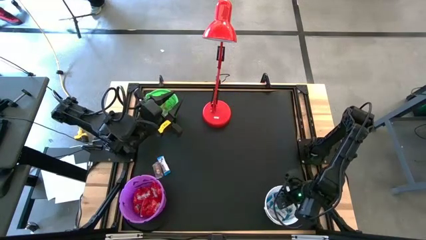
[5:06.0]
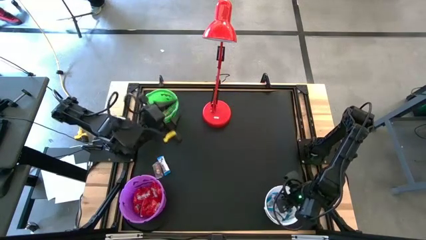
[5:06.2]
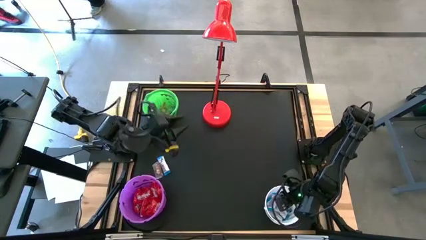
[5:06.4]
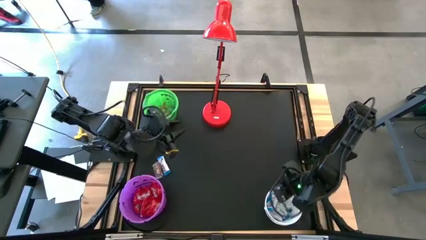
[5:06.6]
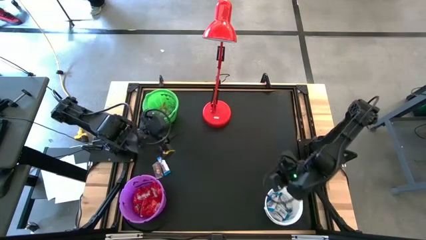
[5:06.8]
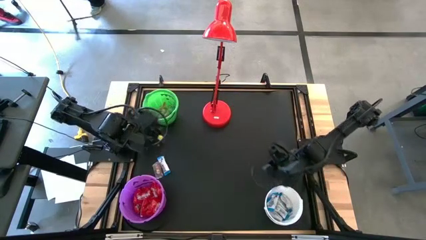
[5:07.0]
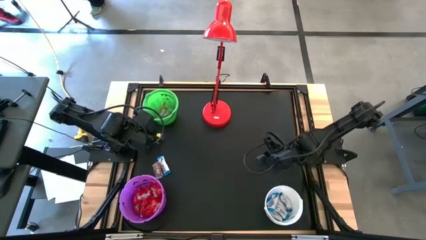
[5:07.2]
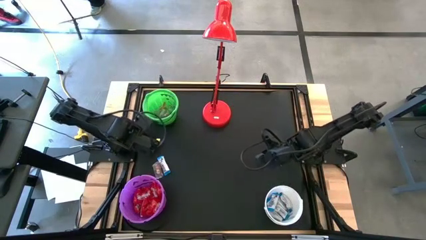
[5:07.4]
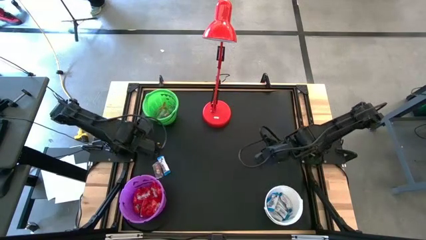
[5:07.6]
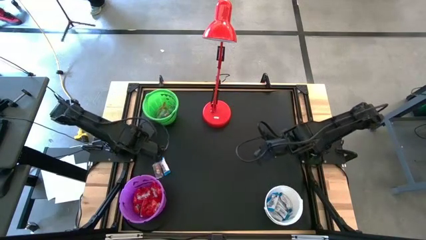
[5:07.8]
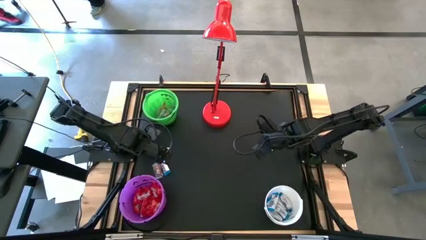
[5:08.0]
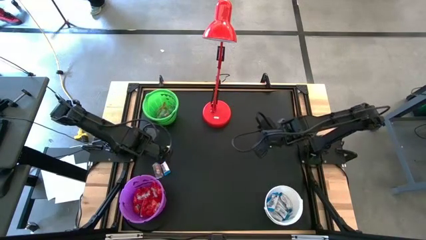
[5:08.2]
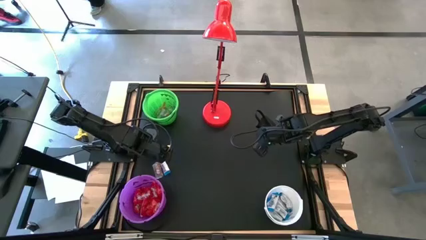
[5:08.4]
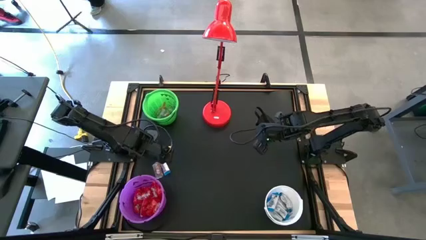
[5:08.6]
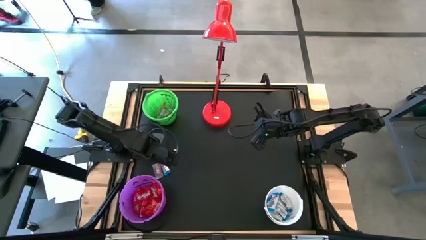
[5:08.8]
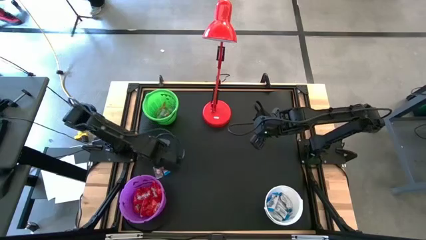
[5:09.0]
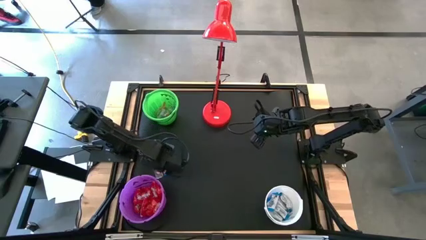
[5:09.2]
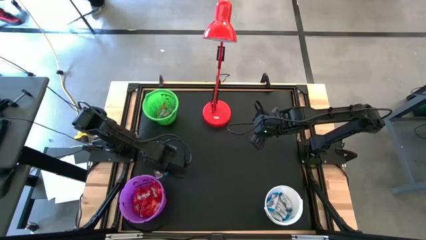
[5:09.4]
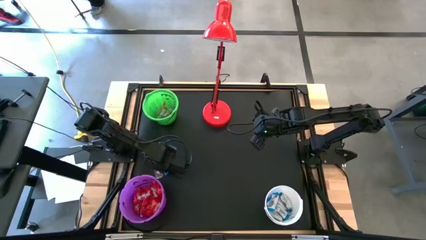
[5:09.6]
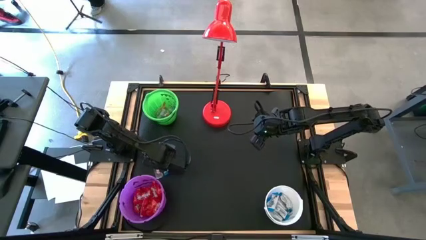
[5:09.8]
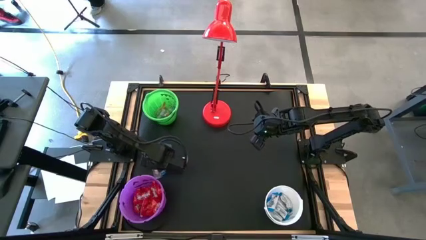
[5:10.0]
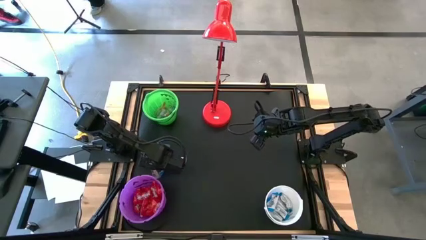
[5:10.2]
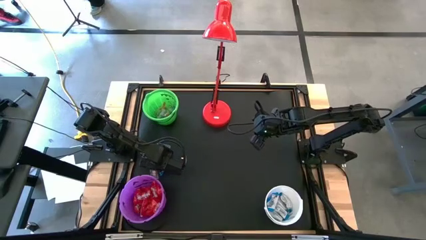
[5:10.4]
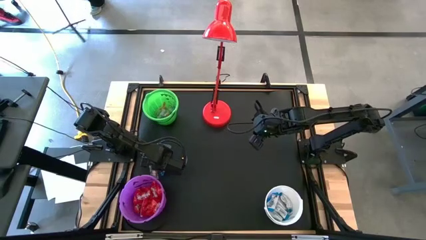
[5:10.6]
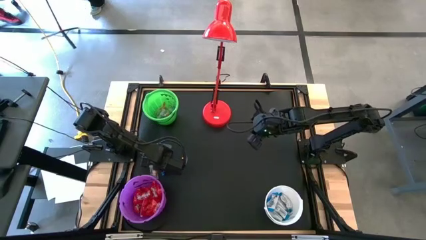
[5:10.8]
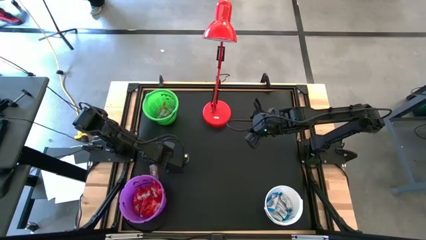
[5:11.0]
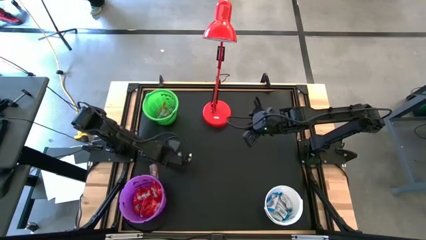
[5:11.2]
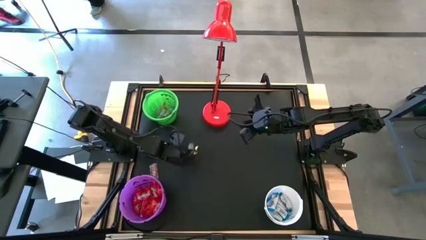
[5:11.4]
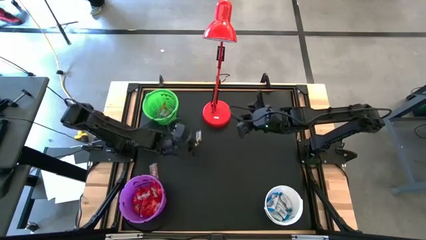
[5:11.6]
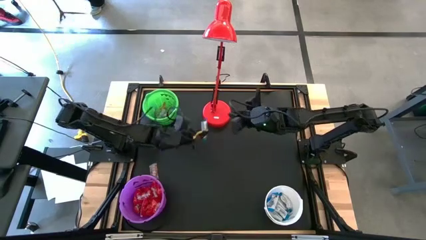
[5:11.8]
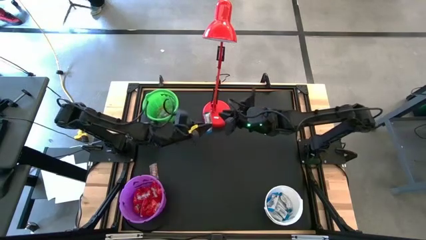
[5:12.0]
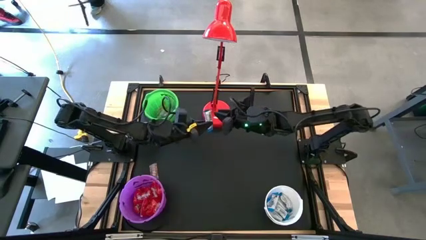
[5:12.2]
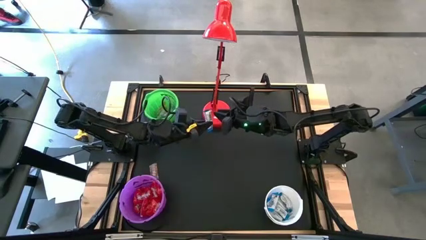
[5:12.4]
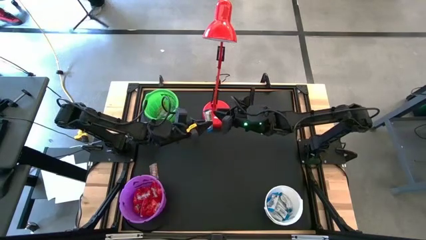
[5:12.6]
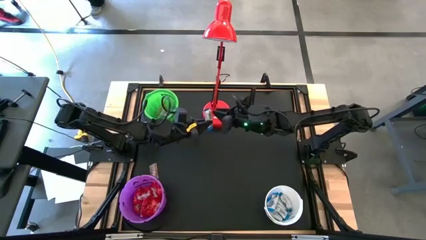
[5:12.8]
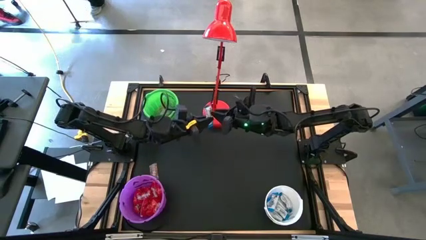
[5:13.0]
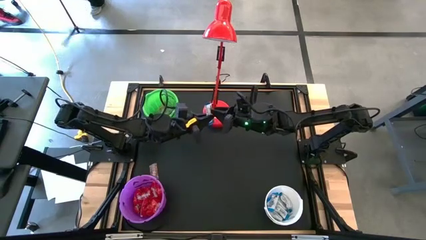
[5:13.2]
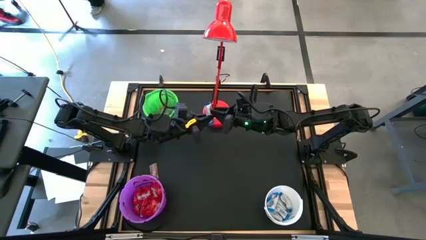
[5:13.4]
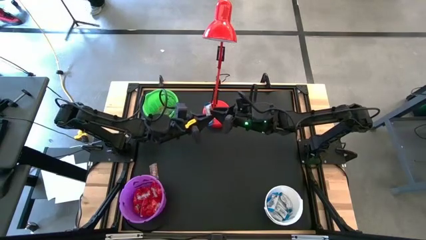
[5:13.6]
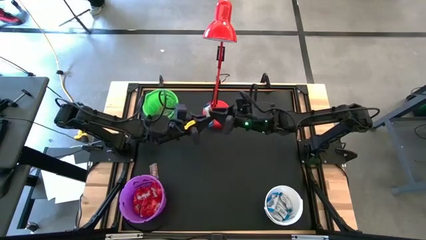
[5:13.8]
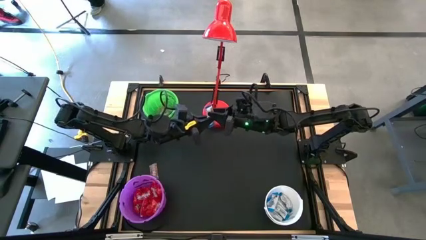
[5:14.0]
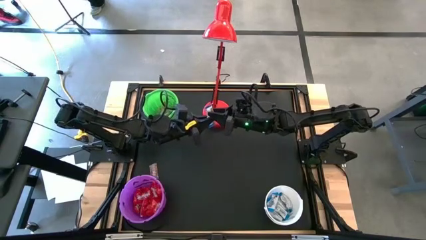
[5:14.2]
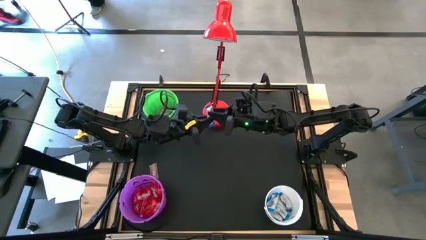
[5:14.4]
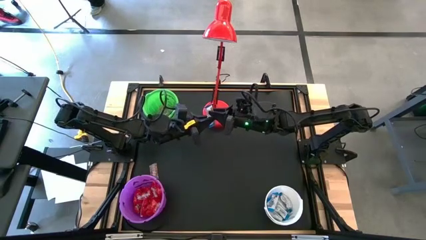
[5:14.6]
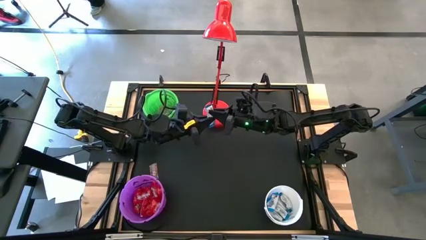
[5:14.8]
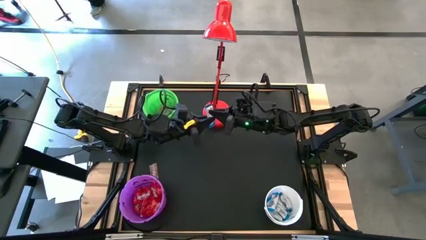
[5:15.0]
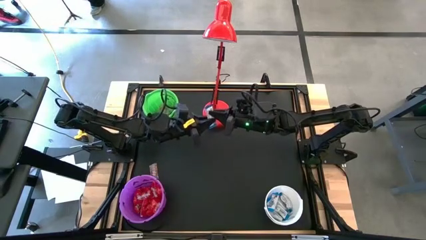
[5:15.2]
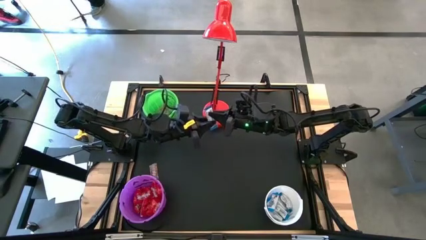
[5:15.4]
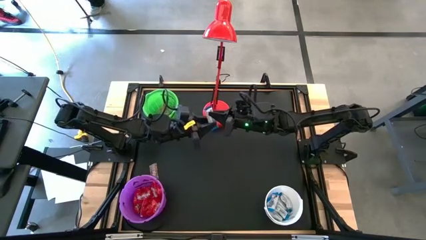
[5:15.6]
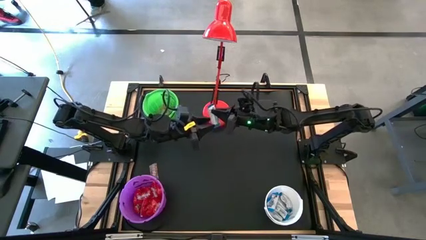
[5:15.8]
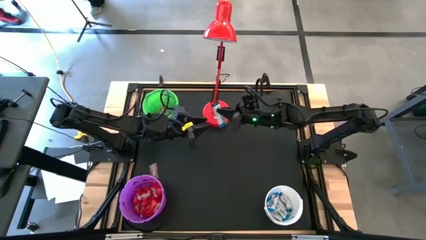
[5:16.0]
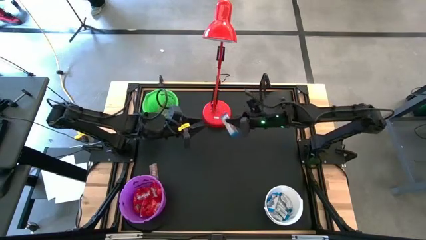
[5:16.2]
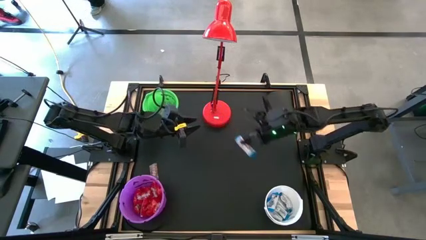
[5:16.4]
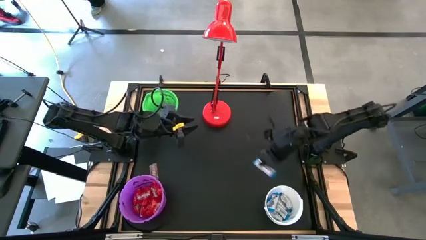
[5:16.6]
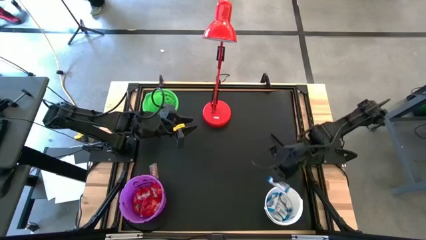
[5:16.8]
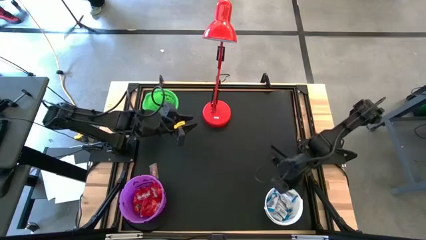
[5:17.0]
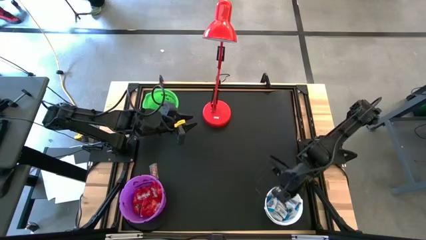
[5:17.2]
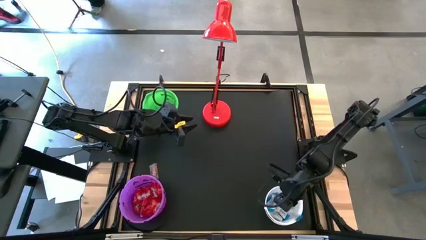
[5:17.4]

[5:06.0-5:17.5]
Task: Sort candy
Put the white chocolate into the white bucket

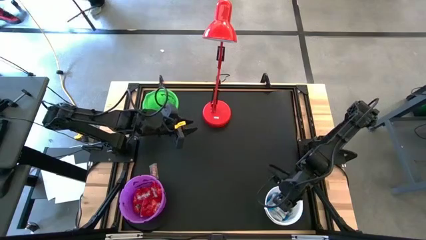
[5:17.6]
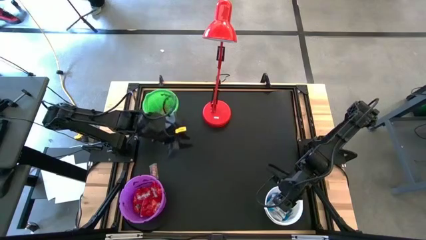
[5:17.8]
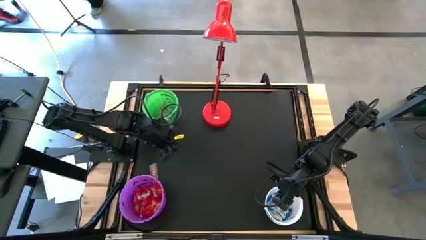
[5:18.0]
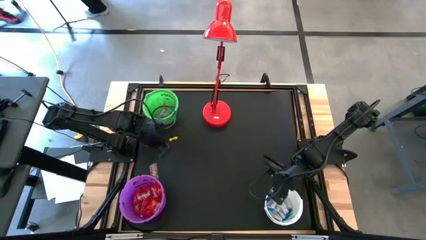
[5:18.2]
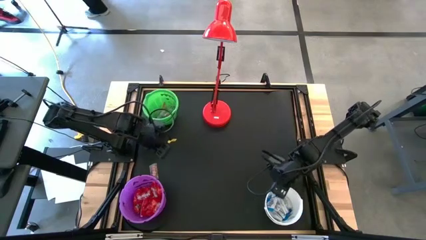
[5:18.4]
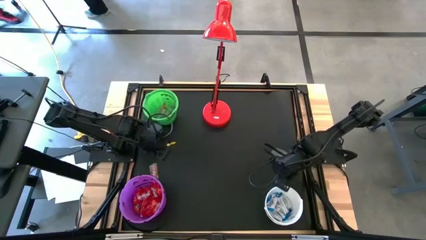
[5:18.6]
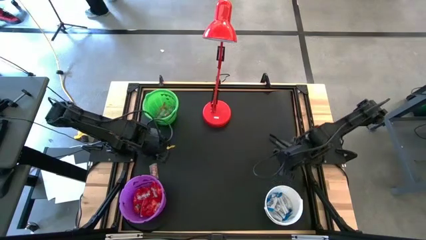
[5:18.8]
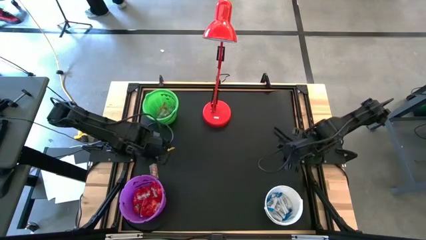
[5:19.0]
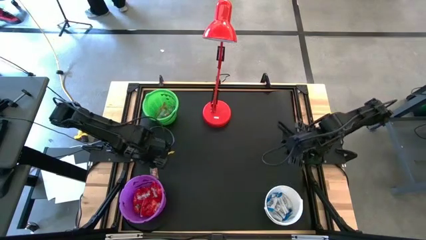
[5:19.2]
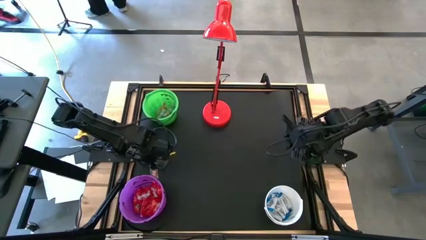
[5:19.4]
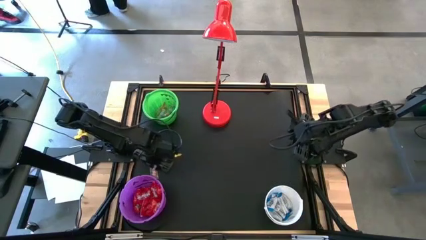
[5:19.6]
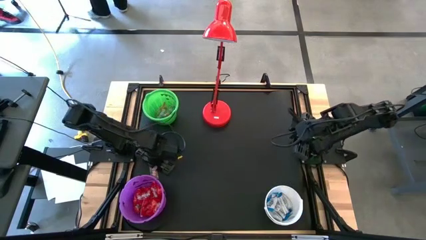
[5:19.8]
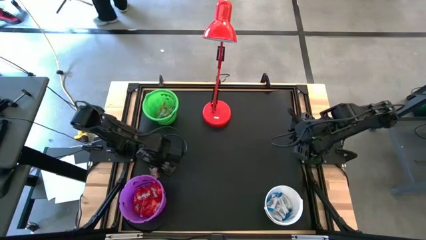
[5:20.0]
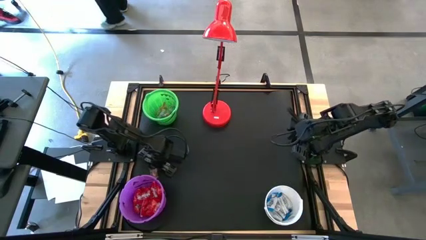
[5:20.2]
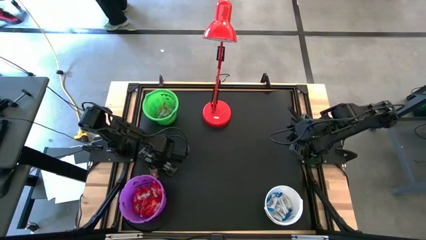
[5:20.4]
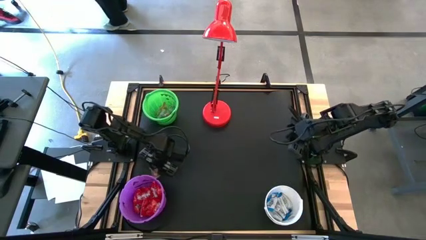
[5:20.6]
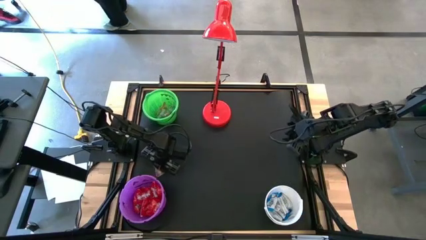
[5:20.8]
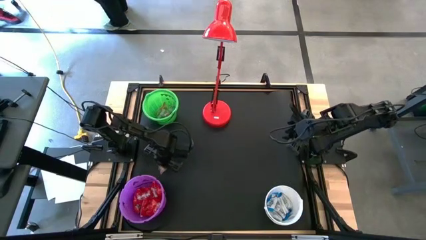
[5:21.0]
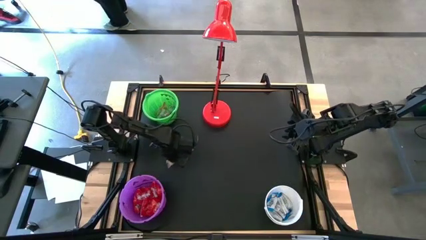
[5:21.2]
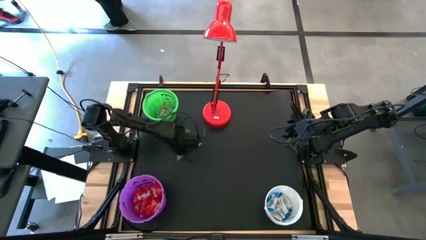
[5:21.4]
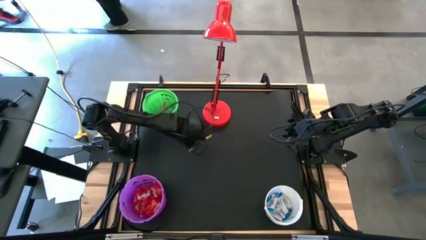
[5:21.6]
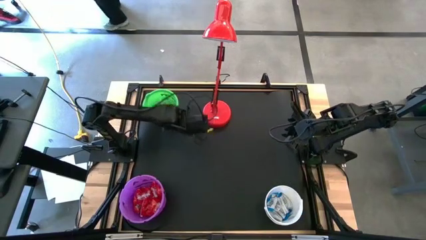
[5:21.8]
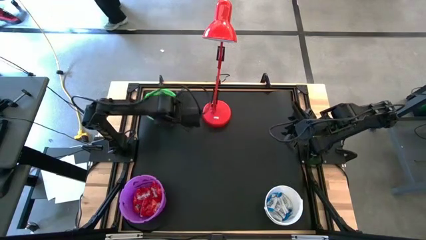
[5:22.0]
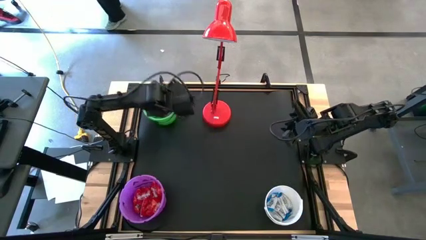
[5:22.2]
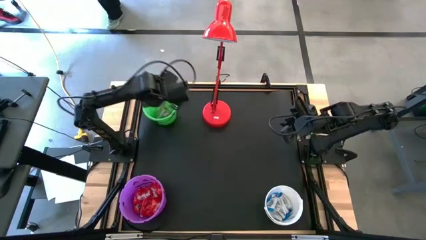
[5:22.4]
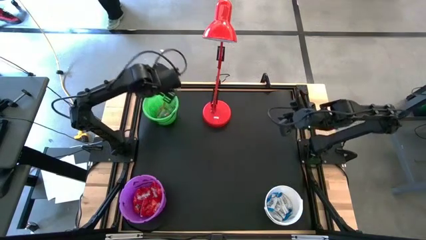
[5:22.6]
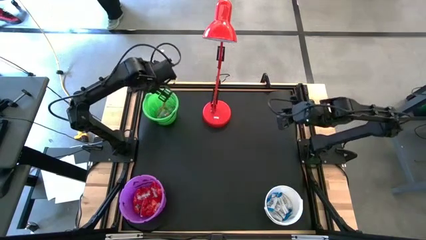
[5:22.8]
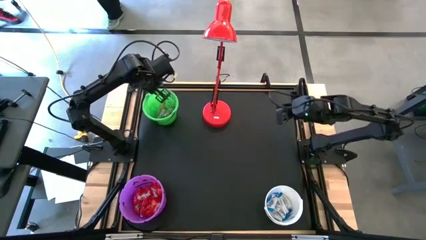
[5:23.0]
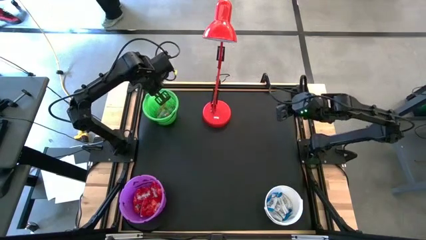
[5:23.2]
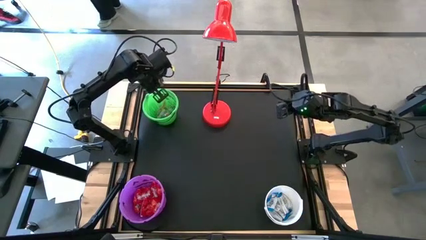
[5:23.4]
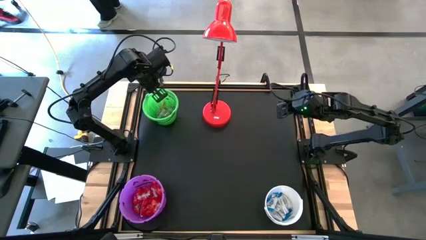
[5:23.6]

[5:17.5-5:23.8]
Put the orange gummy into the green bucket
